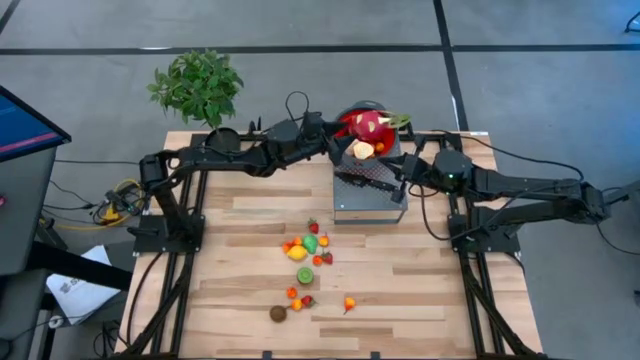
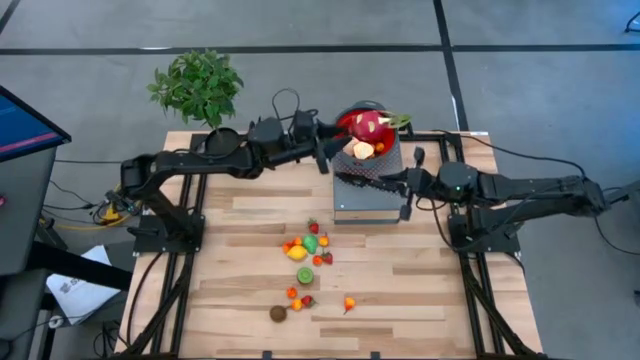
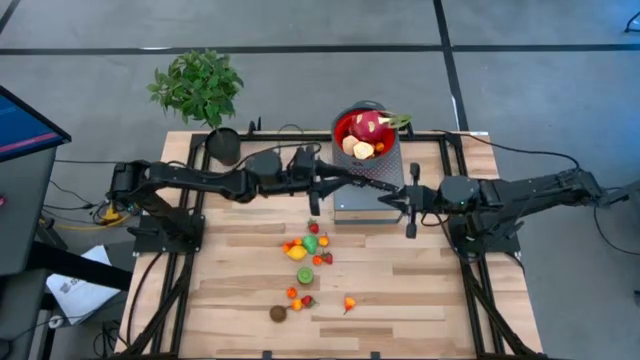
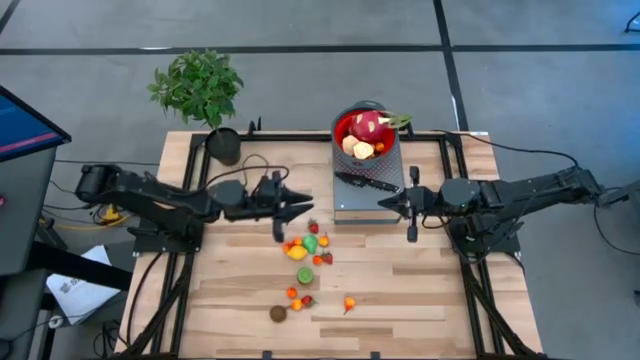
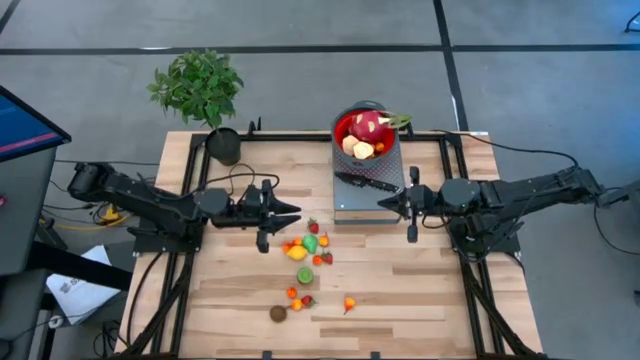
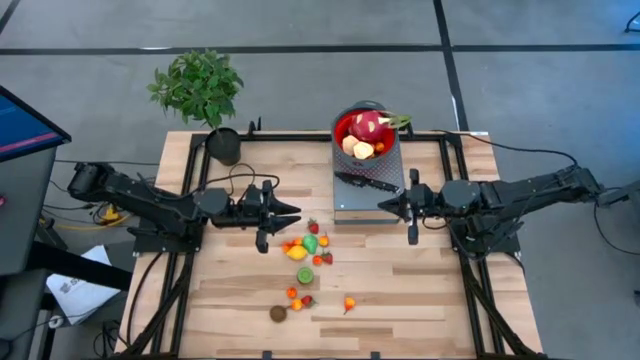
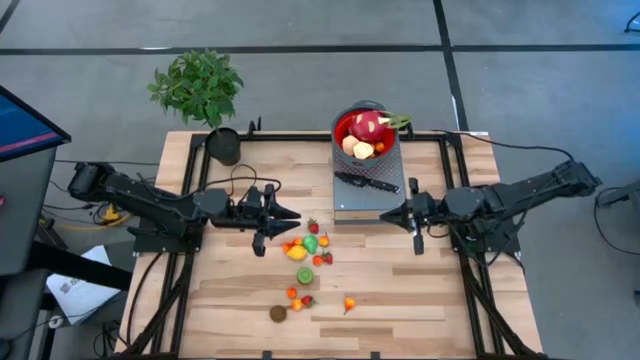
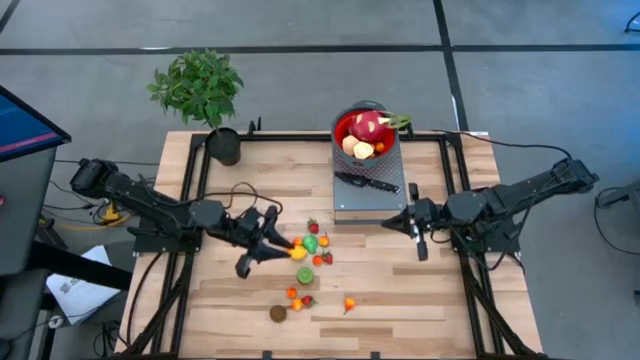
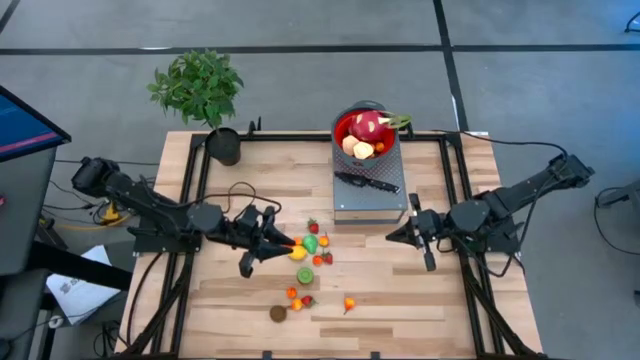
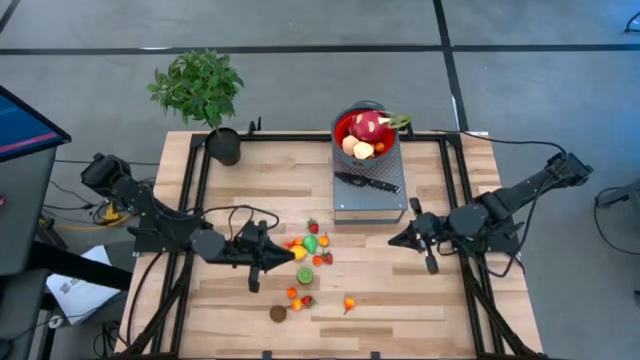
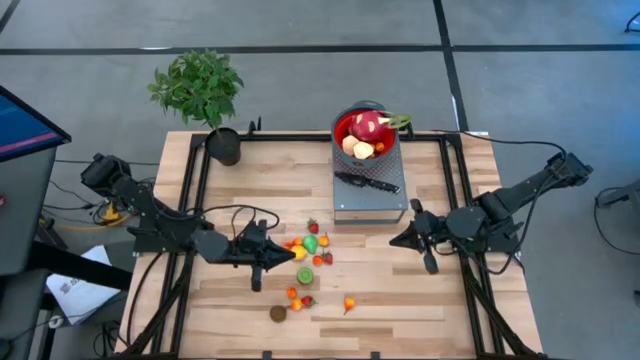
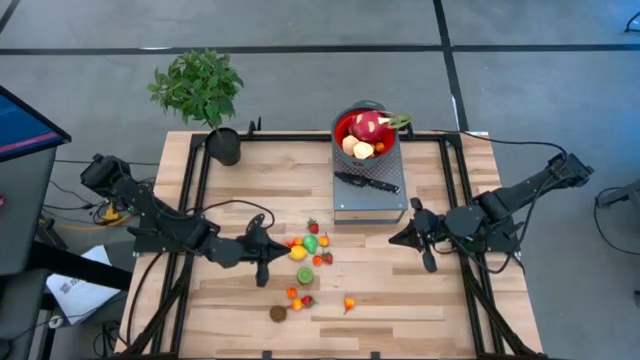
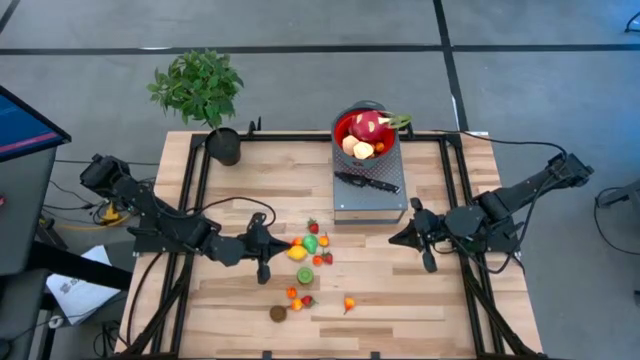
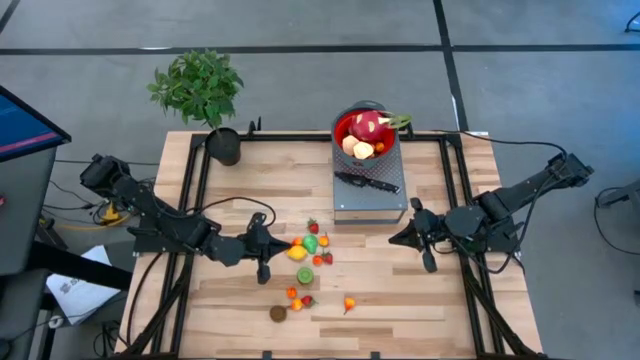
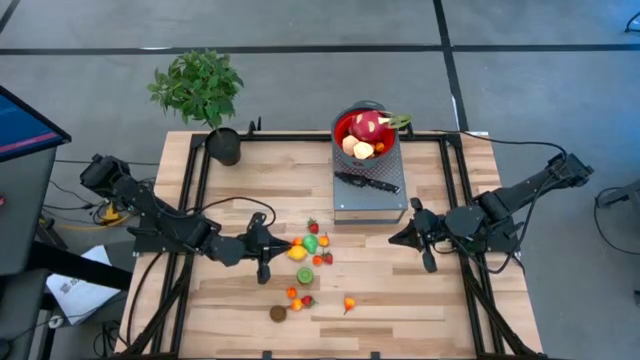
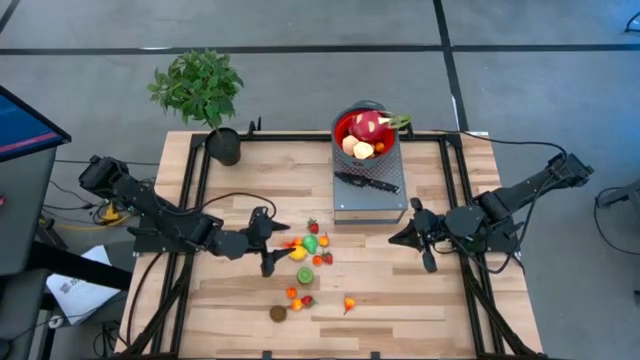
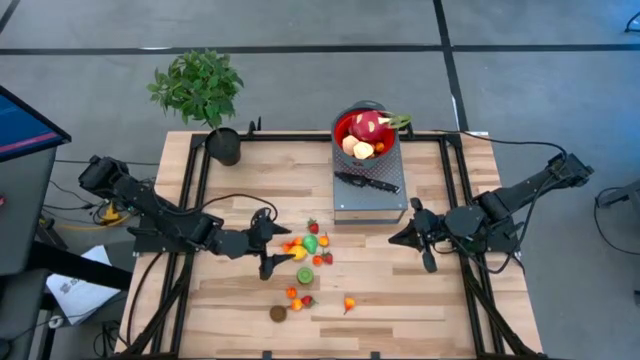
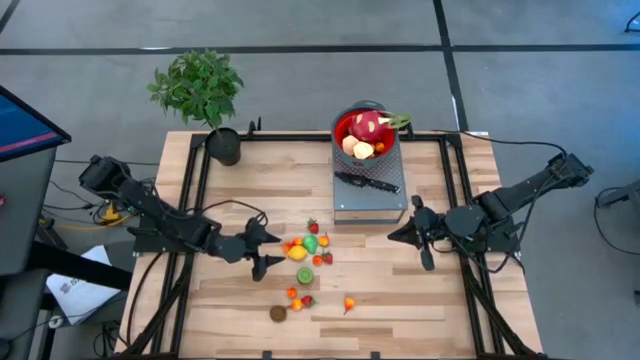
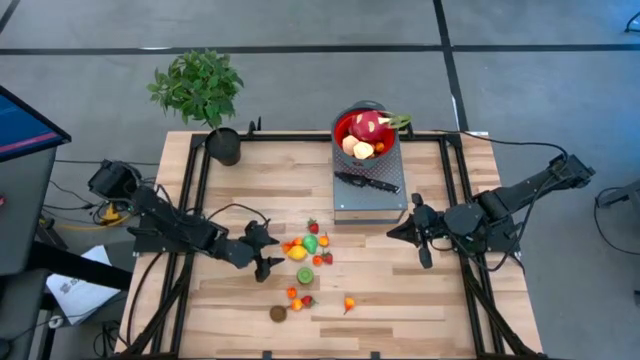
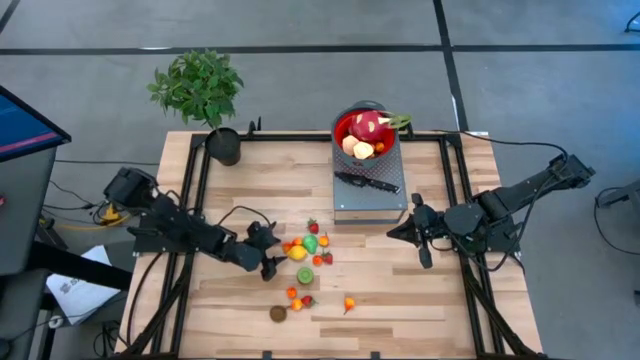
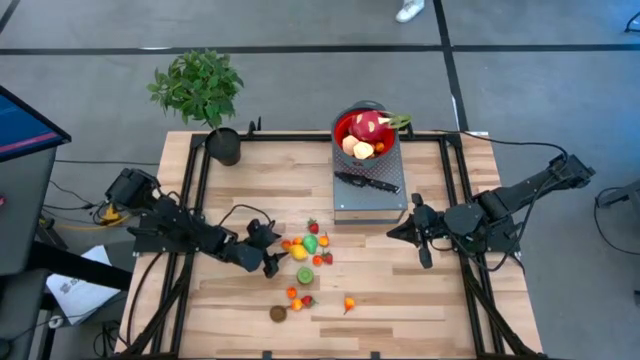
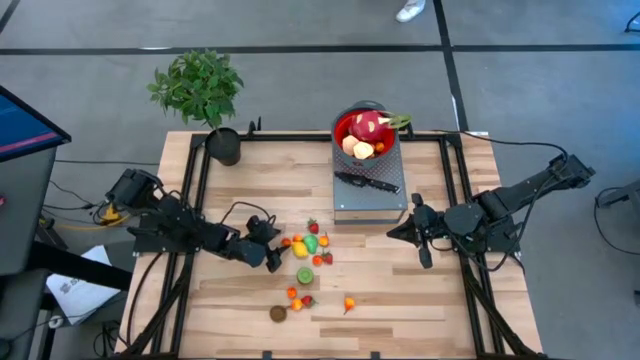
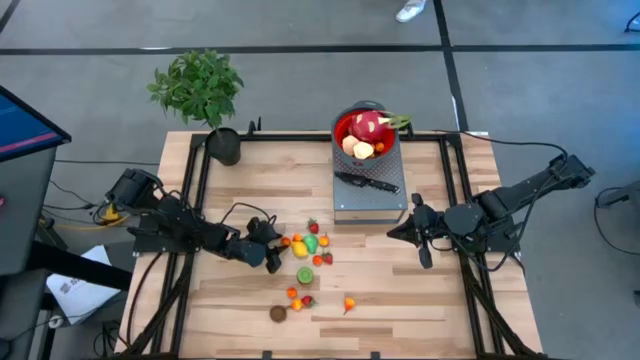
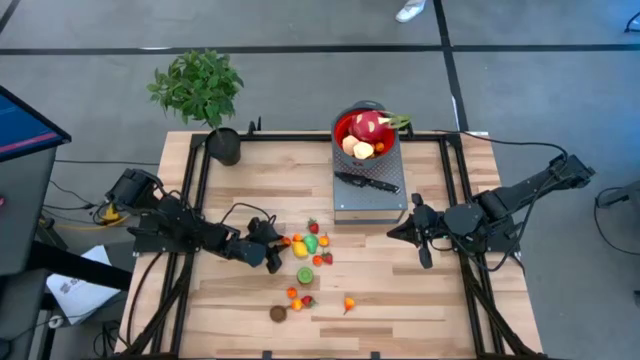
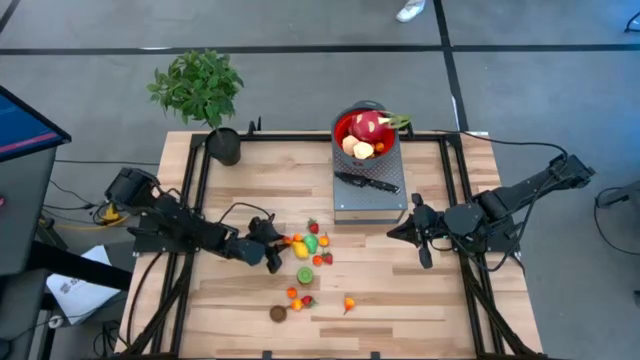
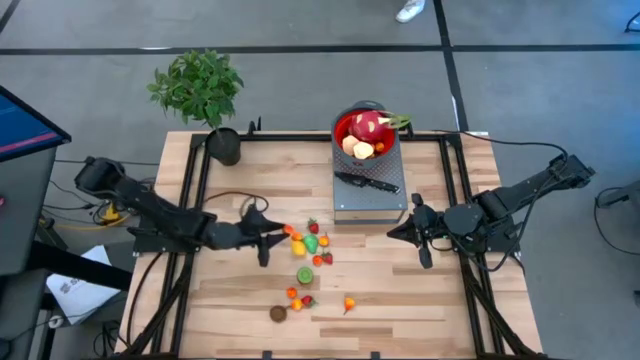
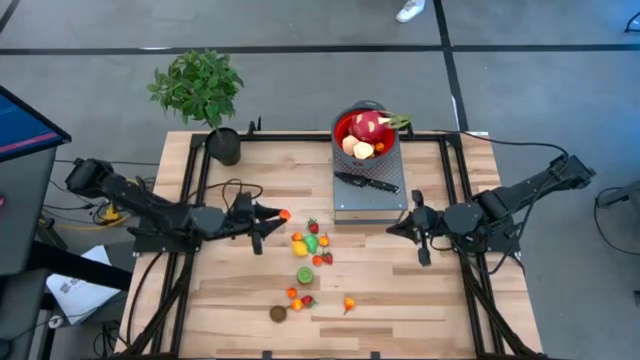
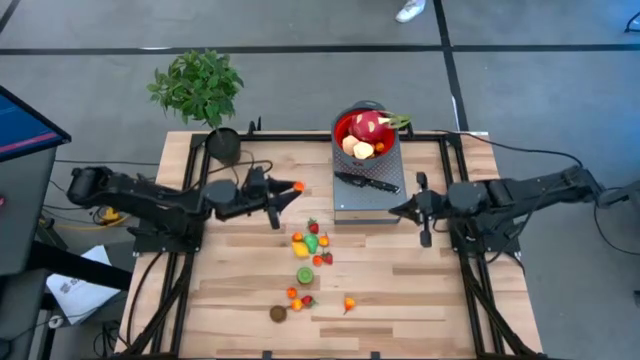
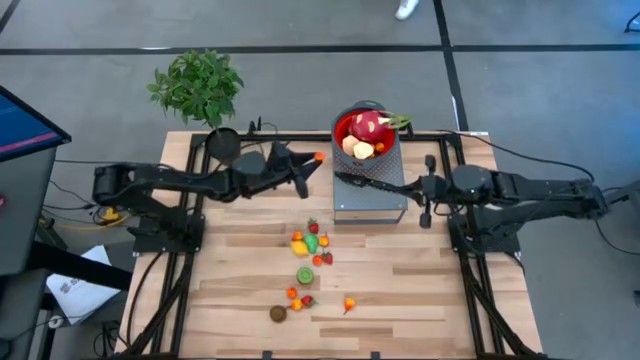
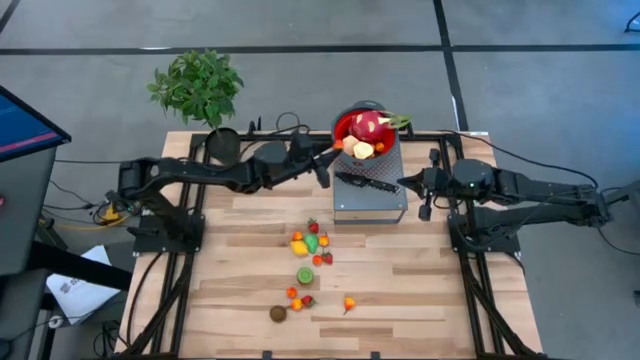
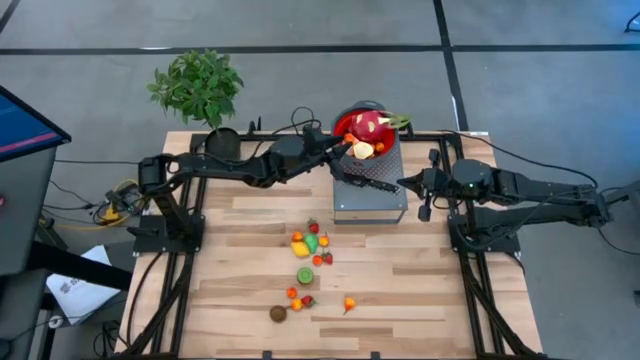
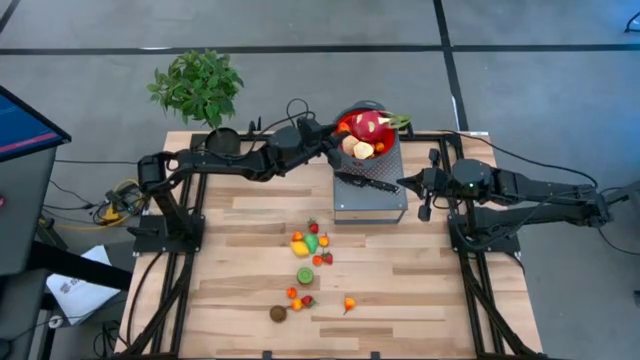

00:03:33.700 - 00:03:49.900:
Task: Pick & Place Fruit
Put the yellow pear into the red colander on the shelf

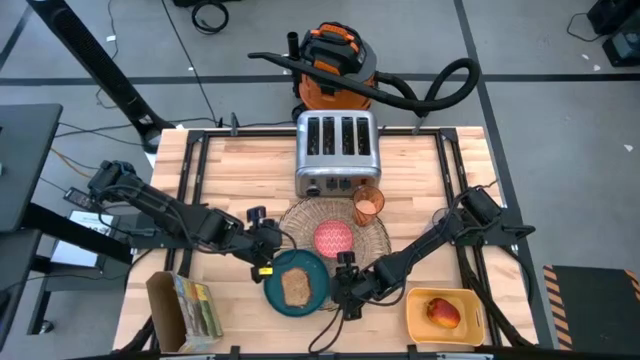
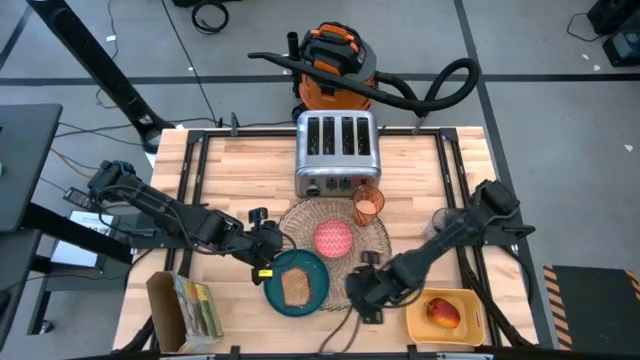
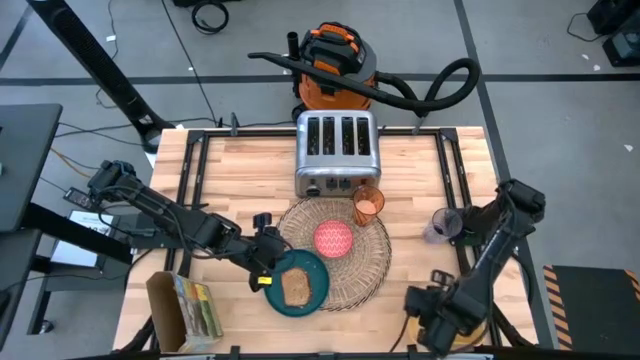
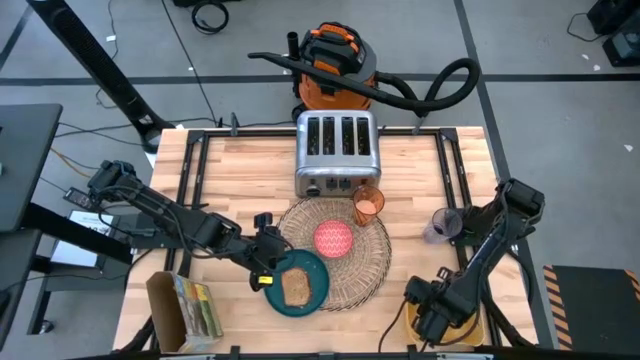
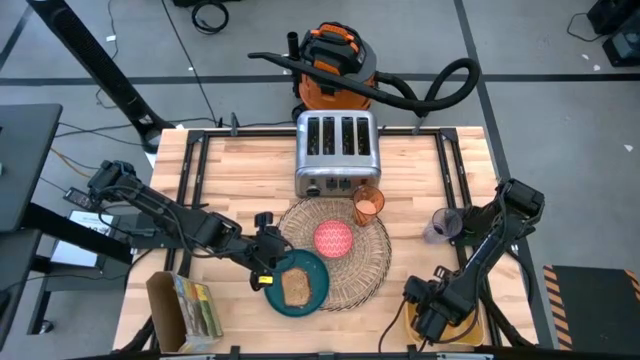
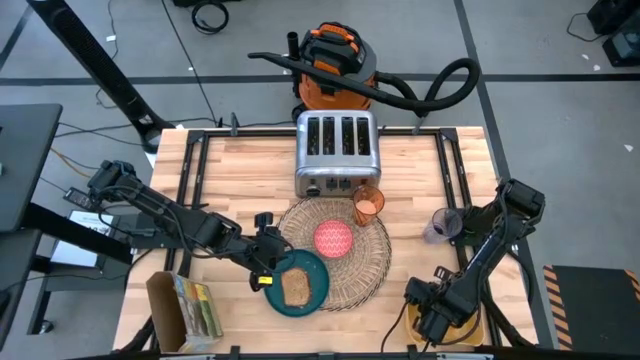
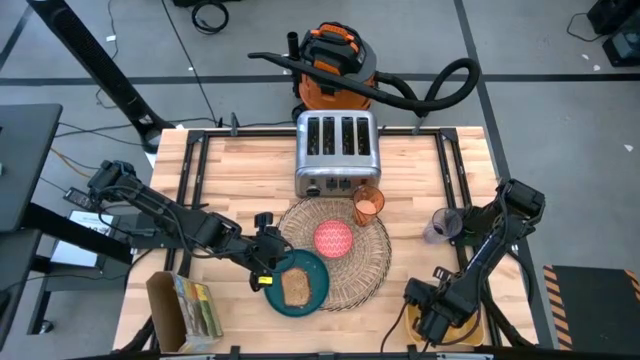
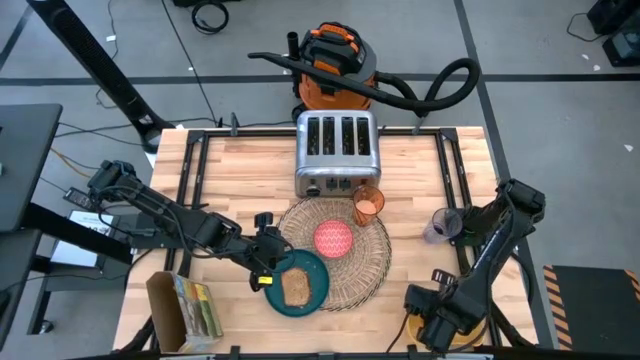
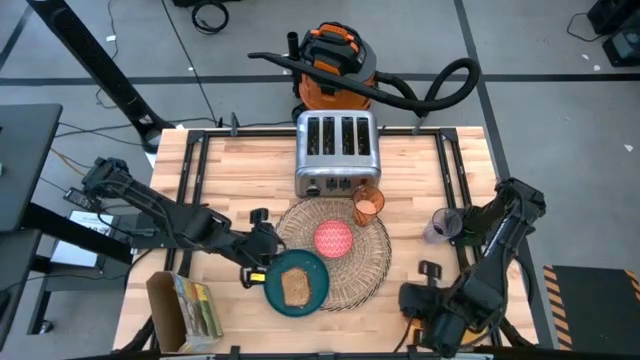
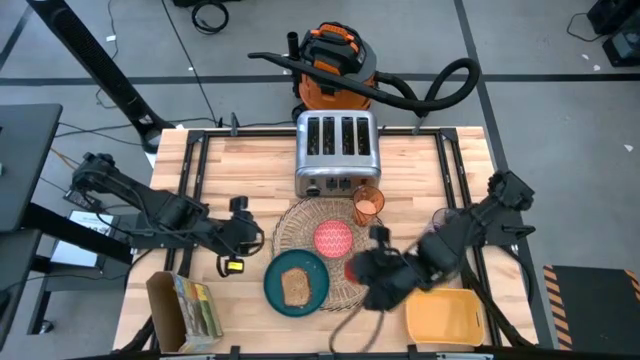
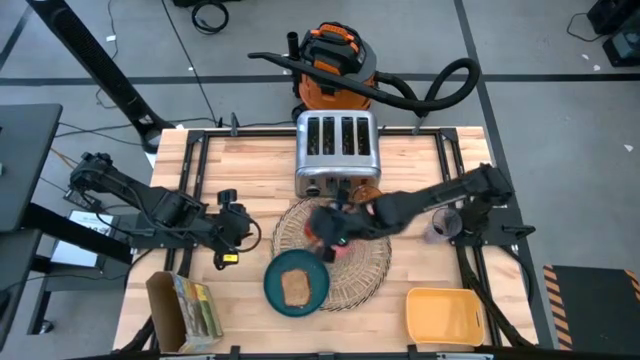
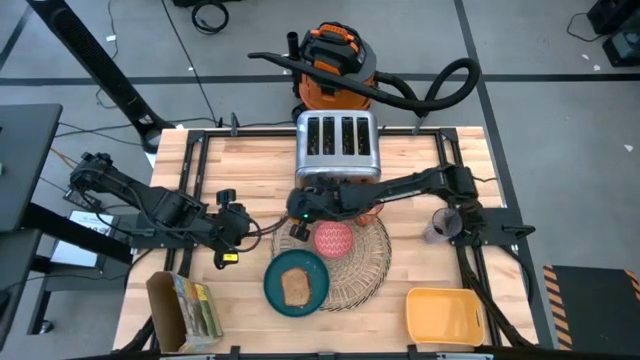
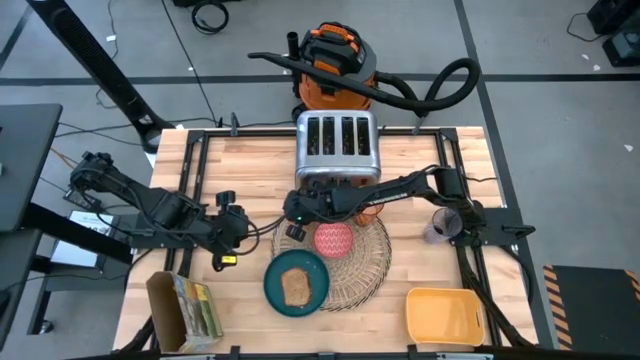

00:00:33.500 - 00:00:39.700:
Task: Arrange a breakfast setting
Put the red apple on the brown placemat to the top left of the red patterned bowl
